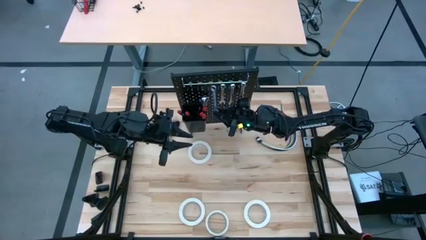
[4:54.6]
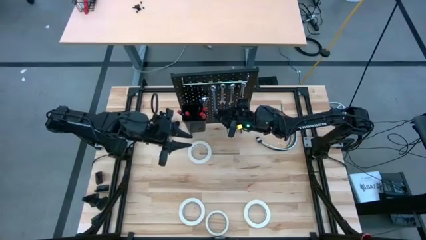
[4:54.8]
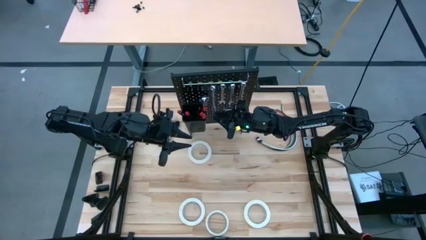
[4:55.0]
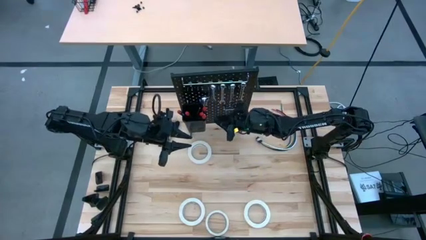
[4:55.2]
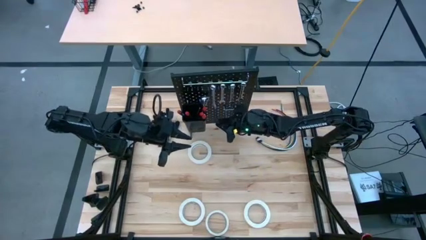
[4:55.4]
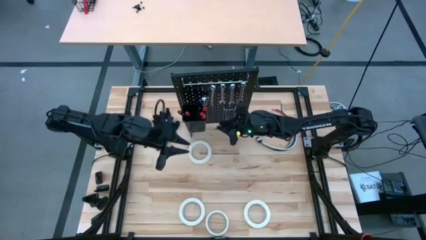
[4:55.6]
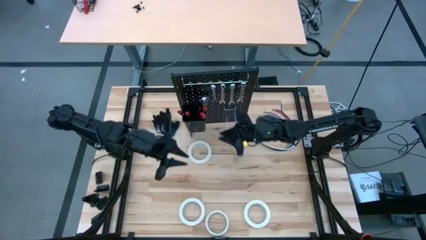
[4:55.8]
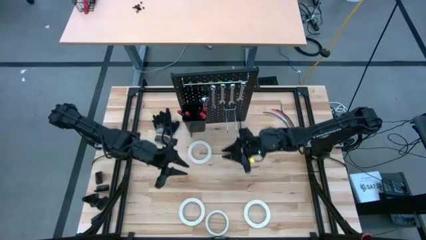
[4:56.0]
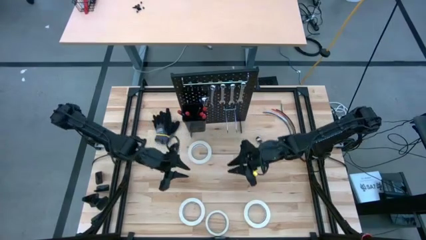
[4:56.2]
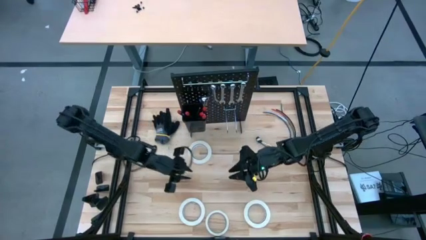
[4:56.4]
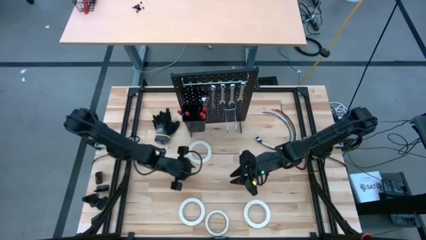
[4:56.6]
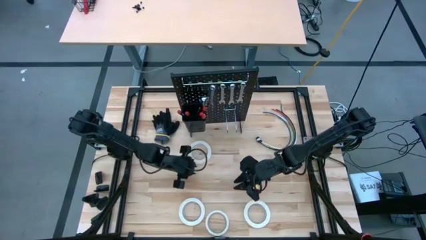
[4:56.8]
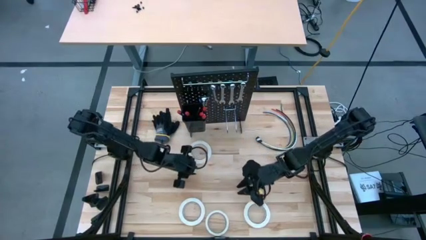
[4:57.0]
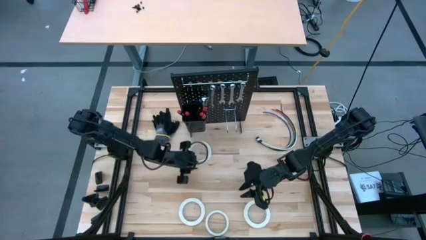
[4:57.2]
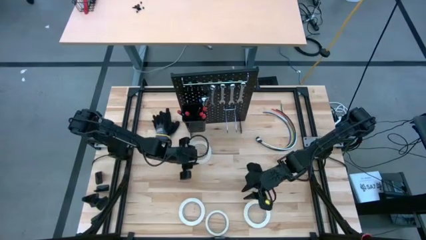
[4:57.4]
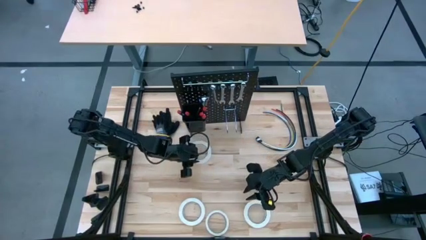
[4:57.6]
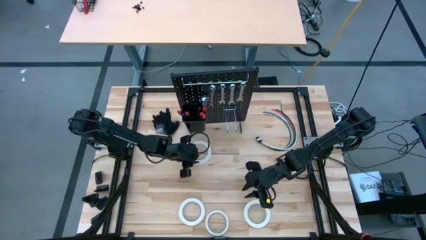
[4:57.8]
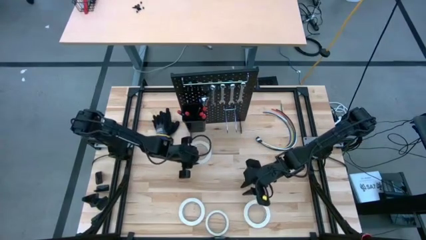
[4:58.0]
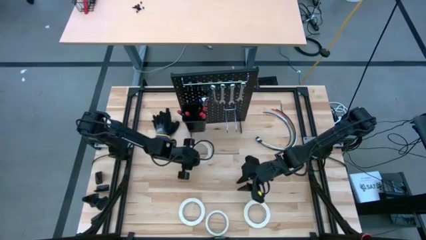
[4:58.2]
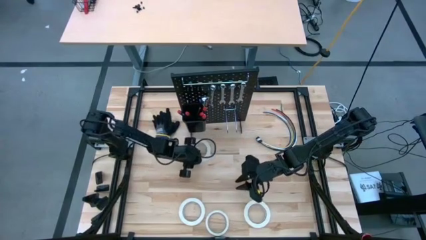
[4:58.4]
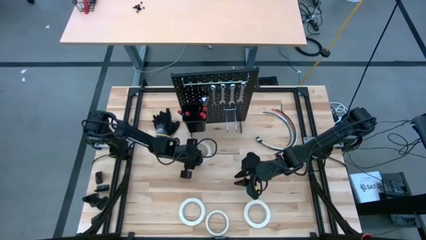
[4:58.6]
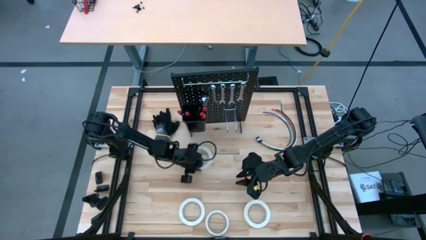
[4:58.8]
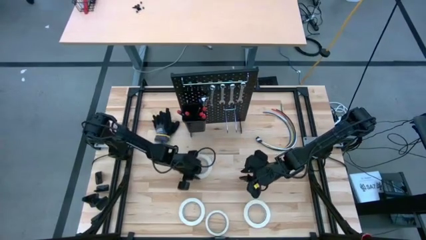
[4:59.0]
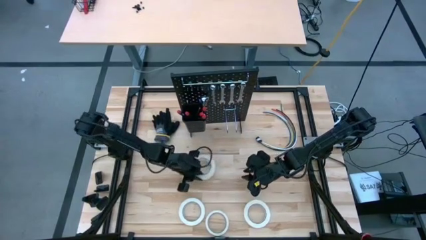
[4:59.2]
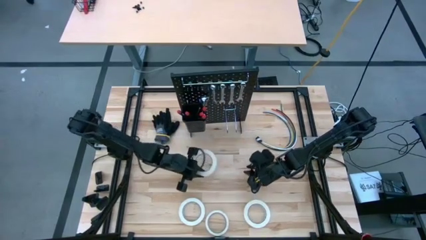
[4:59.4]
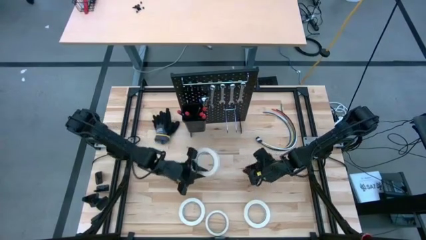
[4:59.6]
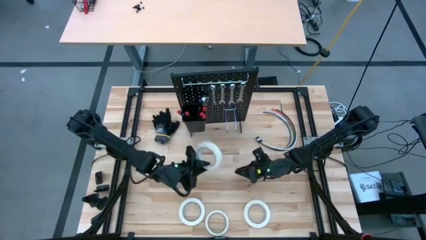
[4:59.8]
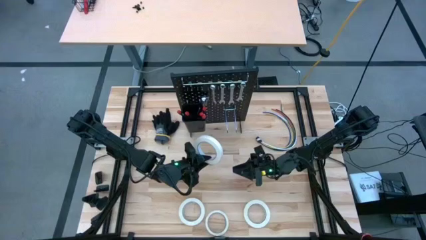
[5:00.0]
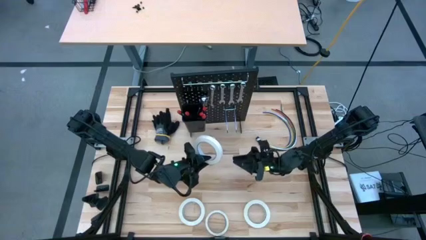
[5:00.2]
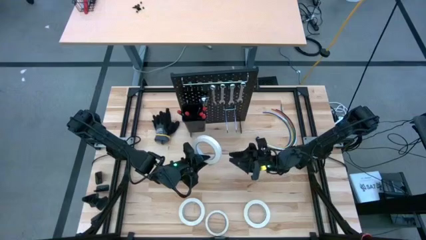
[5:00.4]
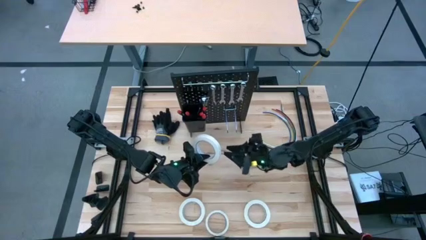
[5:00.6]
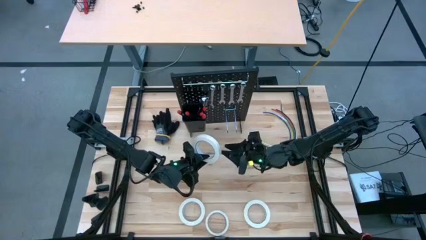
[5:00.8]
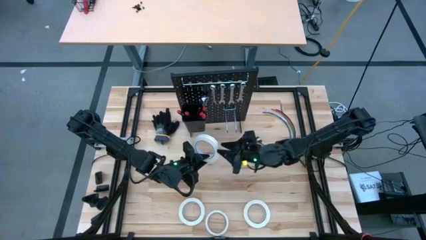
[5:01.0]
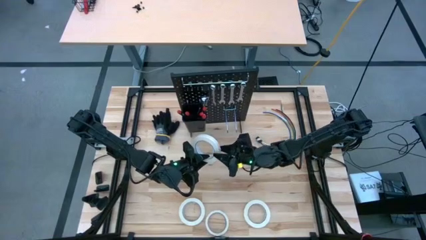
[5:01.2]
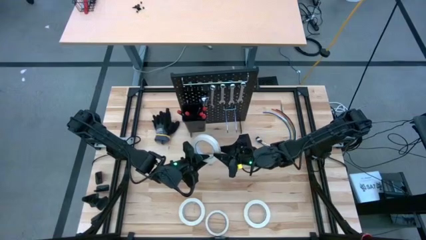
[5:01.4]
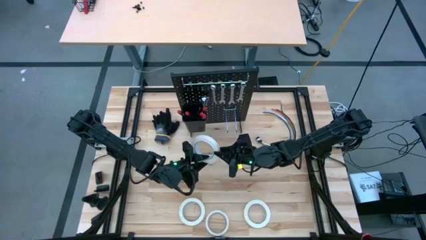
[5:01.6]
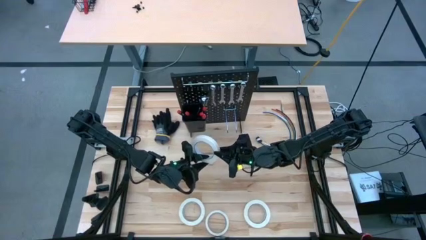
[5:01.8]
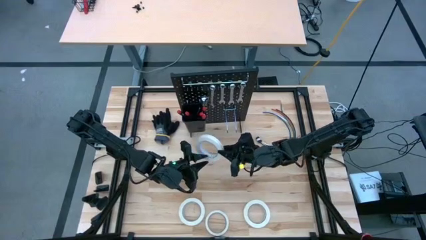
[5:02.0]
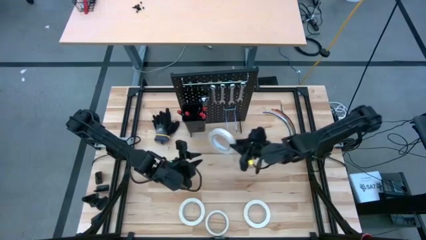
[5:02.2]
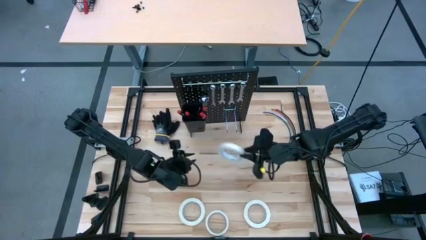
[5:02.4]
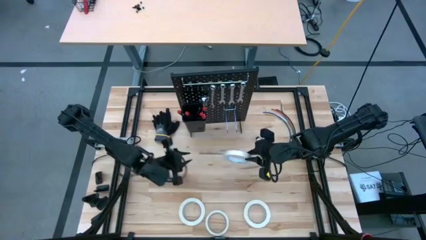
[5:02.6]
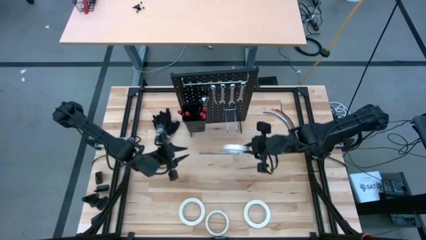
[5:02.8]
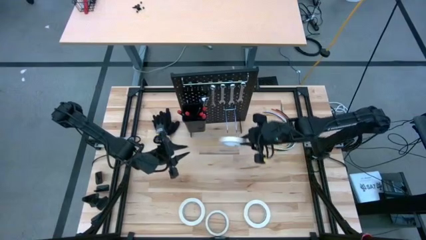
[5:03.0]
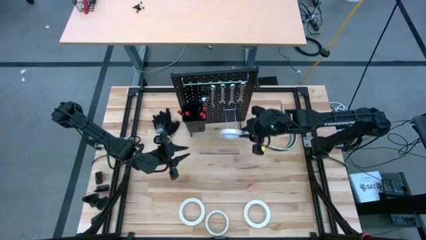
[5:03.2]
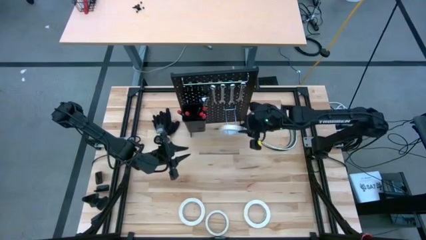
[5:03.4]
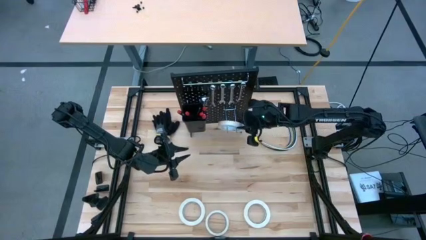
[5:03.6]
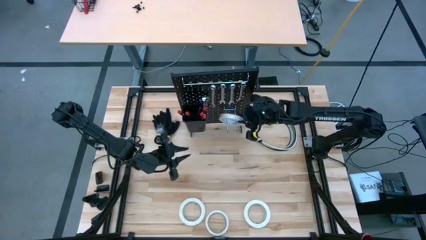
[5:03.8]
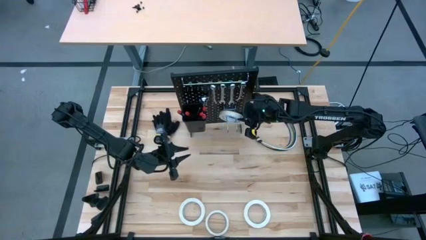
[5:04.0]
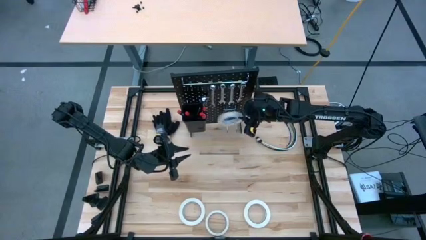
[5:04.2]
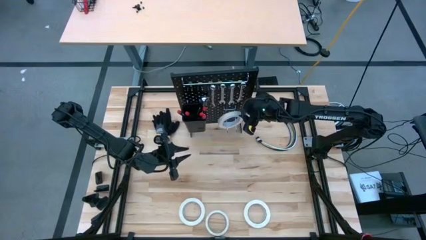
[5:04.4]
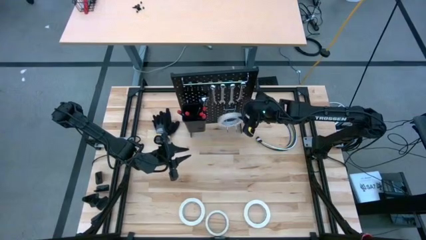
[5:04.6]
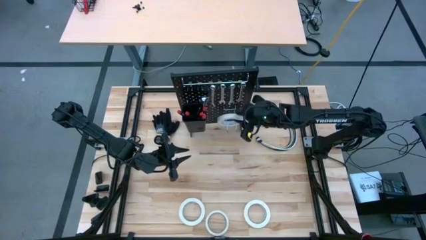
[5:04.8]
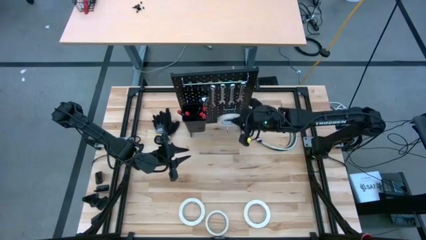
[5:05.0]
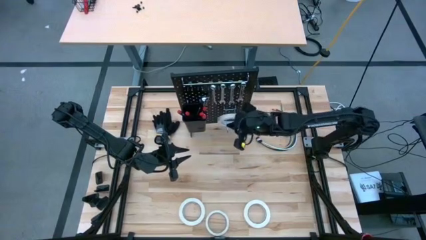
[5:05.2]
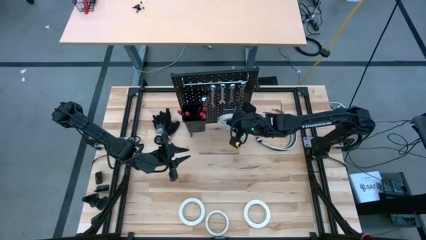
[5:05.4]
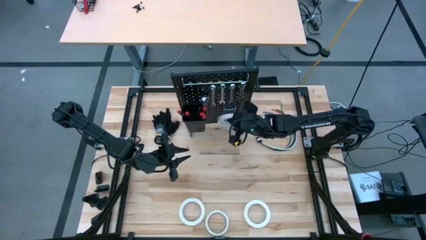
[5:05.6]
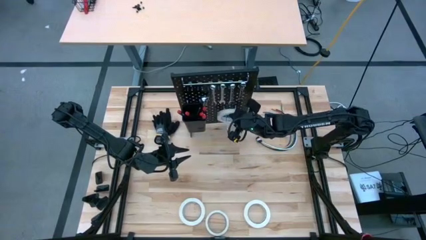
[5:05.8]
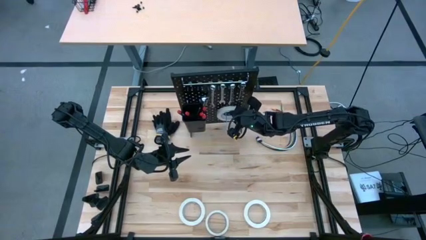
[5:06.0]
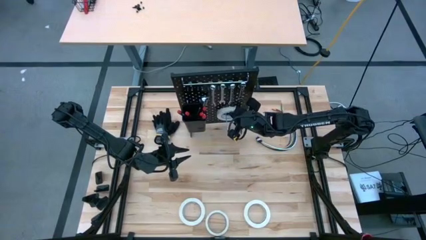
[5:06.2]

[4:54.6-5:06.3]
Task: Hang tools onto peg board
Hang the white masking tape on the peg board

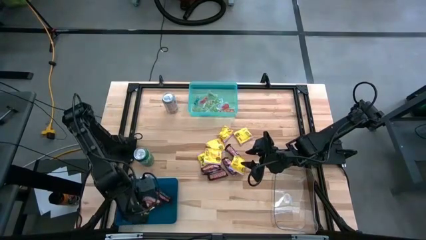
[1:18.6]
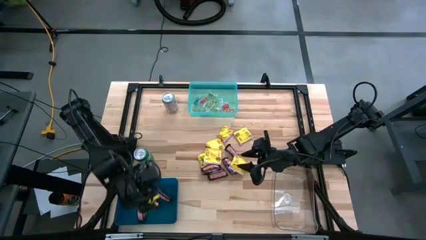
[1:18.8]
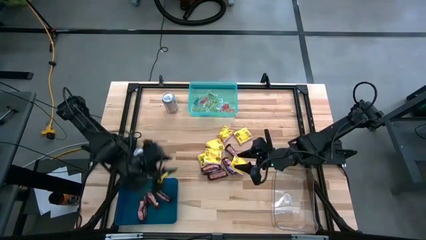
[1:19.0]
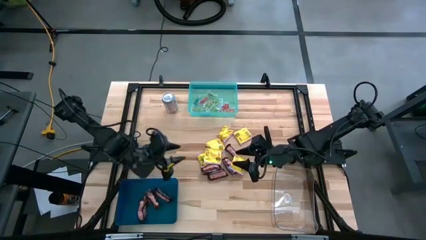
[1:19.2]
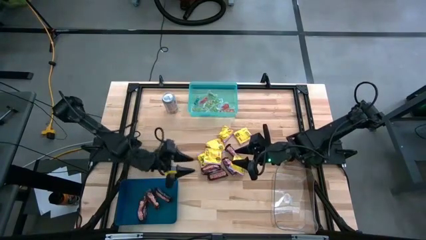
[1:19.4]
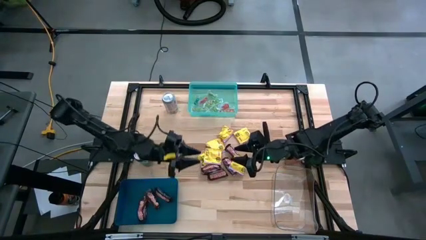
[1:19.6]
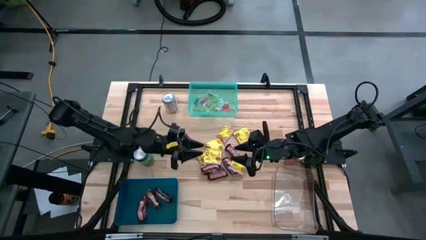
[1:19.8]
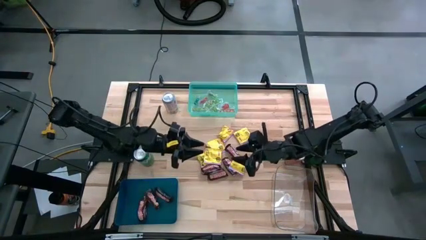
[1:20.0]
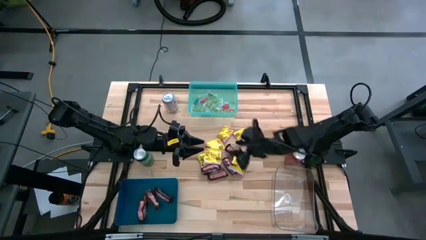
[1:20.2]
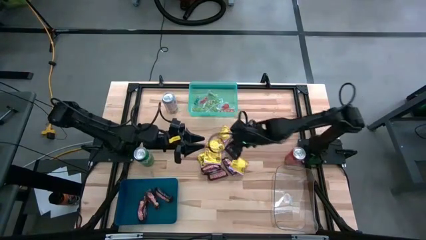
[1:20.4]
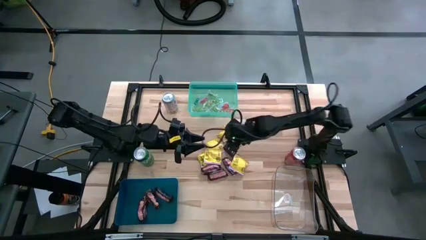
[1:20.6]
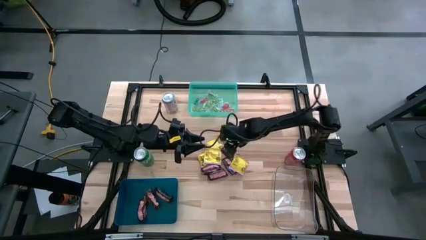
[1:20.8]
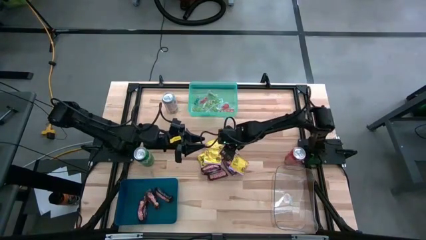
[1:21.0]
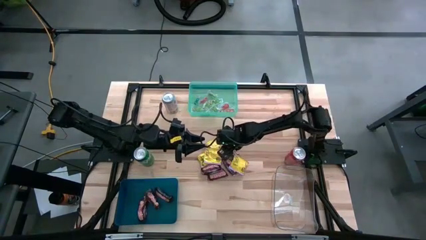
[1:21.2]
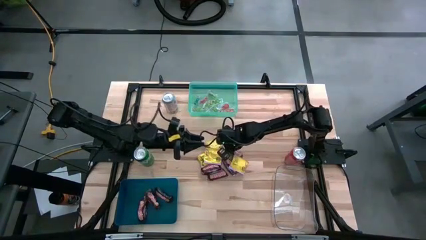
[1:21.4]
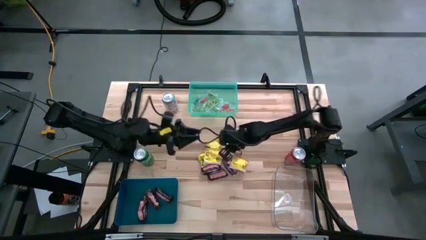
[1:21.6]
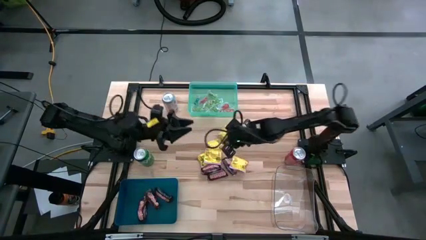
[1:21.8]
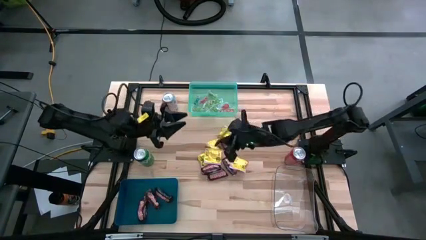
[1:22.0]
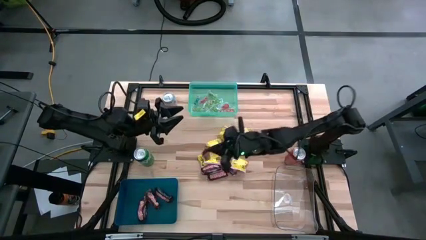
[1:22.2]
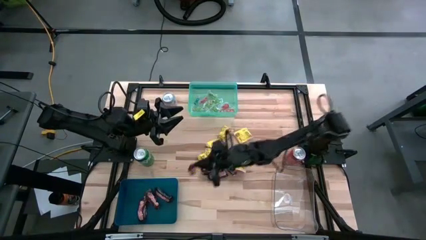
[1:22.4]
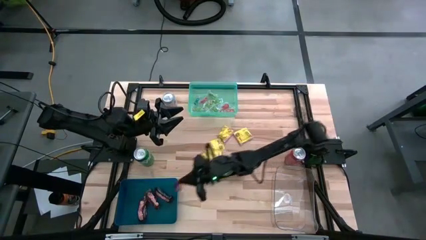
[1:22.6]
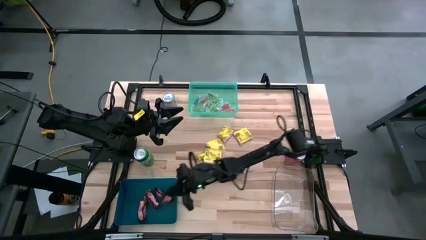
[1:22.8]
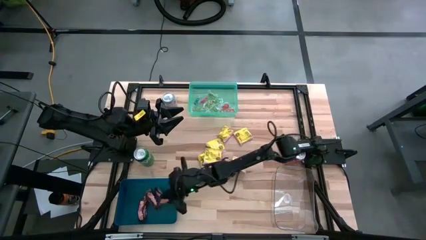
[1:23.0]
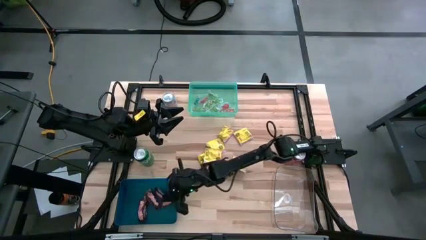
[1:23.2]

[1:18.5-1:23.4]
Task: Sort candy
Put the brown chocolate into the dark blue bin
